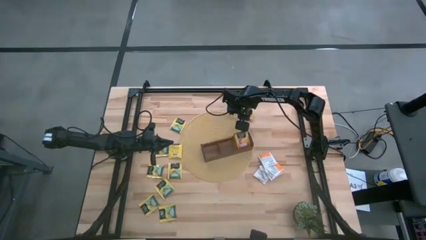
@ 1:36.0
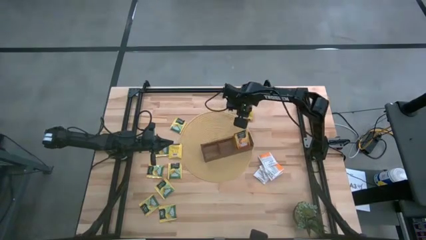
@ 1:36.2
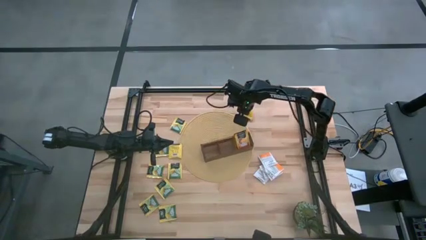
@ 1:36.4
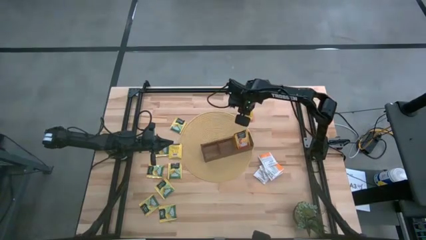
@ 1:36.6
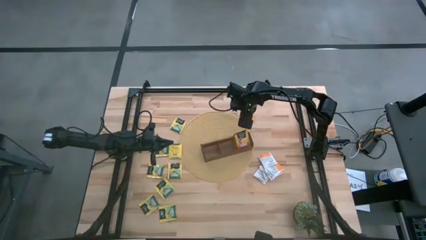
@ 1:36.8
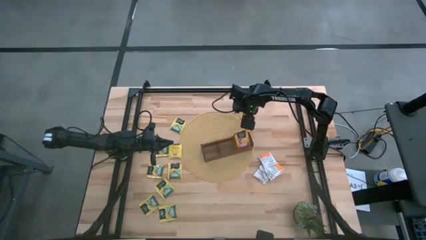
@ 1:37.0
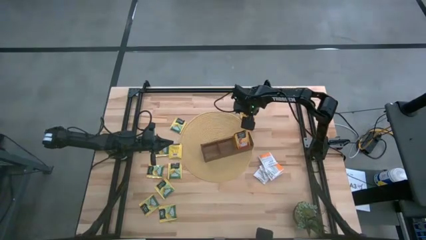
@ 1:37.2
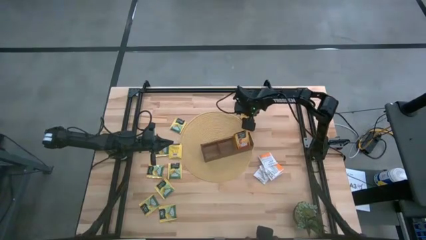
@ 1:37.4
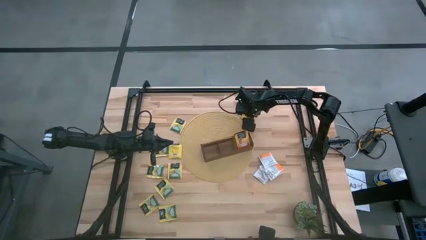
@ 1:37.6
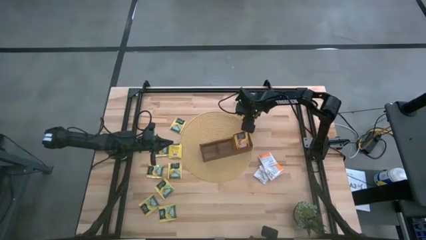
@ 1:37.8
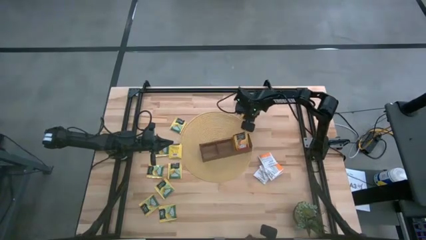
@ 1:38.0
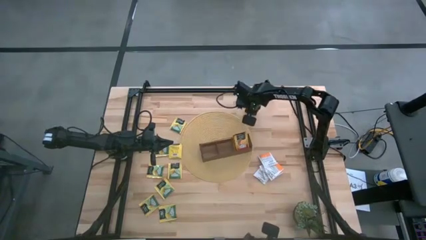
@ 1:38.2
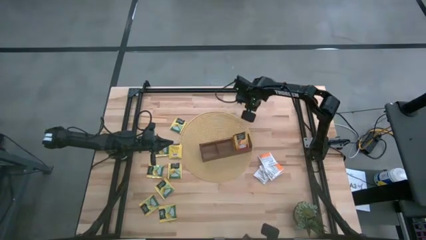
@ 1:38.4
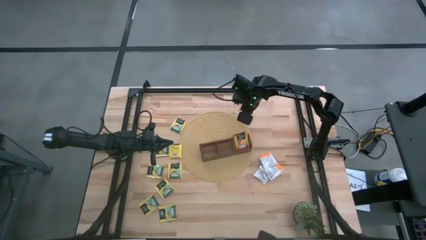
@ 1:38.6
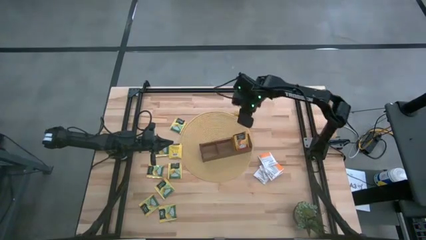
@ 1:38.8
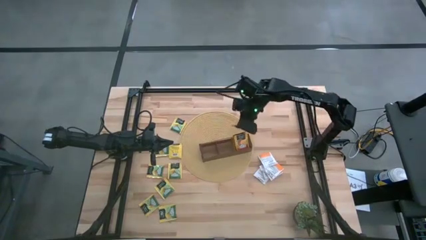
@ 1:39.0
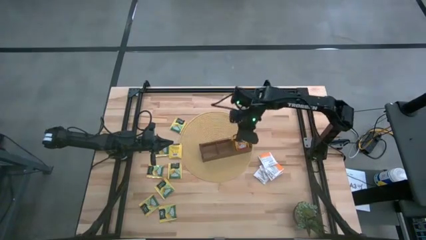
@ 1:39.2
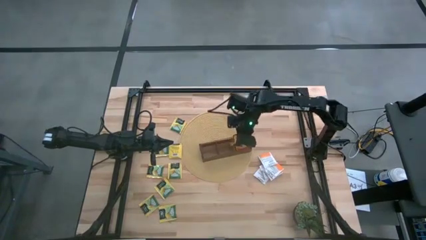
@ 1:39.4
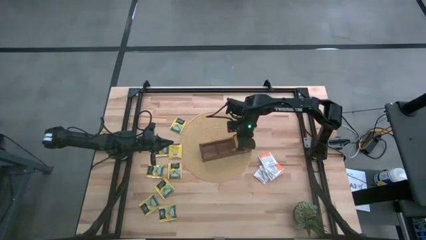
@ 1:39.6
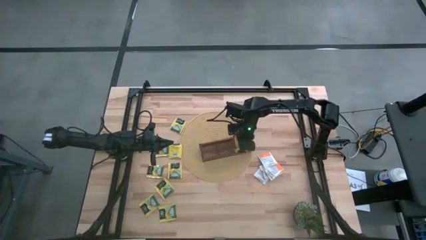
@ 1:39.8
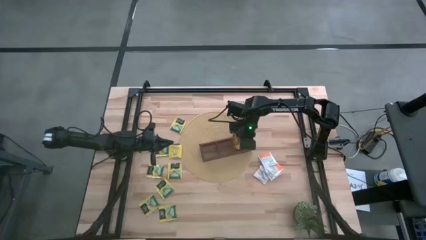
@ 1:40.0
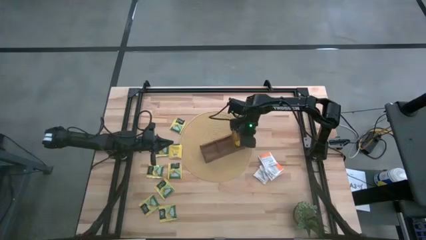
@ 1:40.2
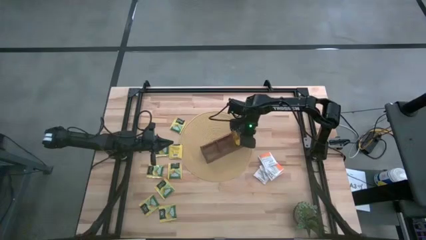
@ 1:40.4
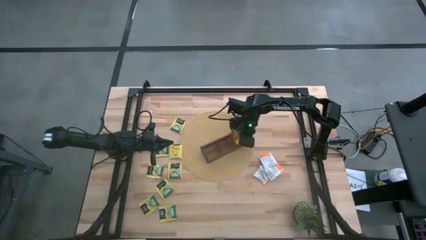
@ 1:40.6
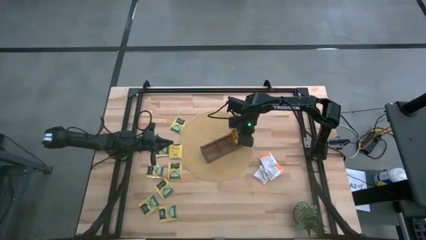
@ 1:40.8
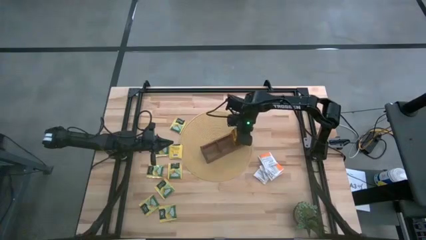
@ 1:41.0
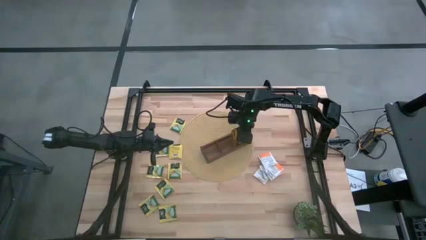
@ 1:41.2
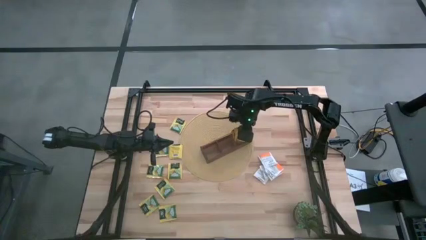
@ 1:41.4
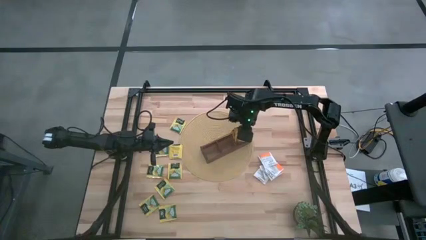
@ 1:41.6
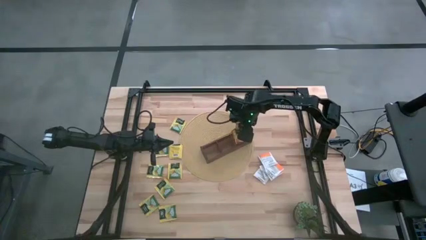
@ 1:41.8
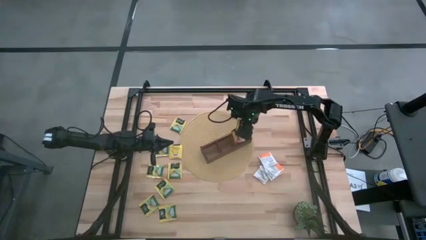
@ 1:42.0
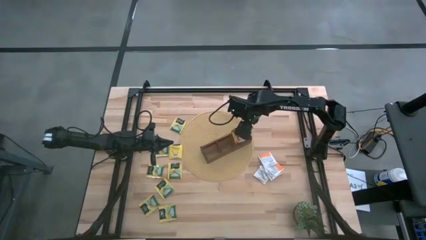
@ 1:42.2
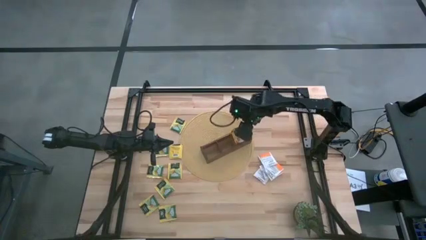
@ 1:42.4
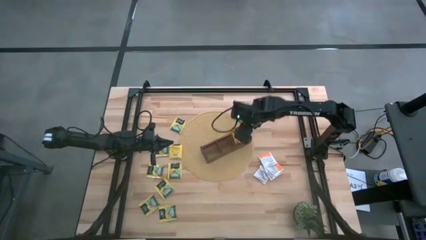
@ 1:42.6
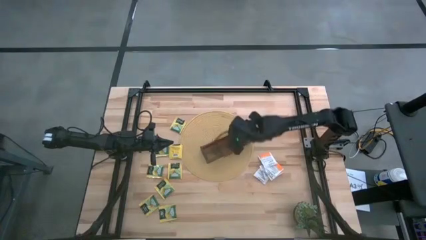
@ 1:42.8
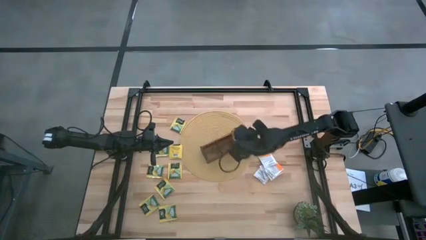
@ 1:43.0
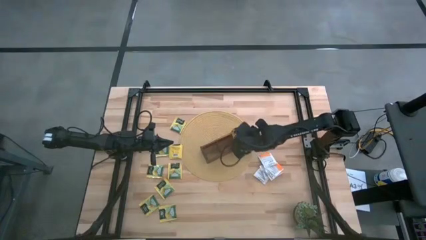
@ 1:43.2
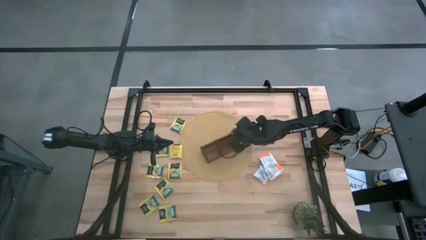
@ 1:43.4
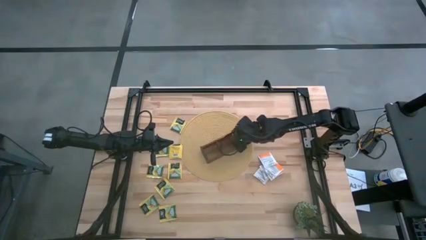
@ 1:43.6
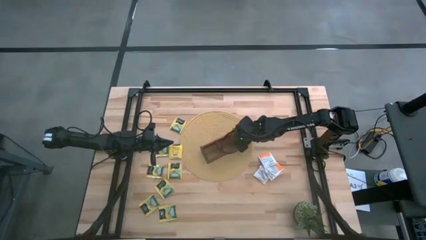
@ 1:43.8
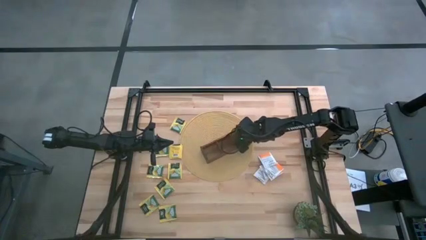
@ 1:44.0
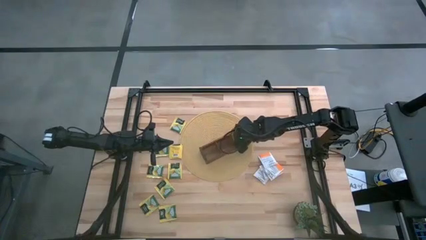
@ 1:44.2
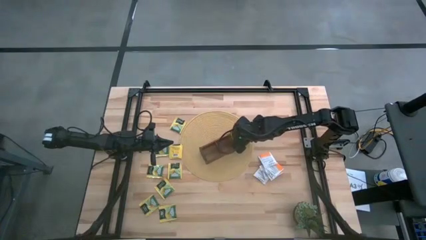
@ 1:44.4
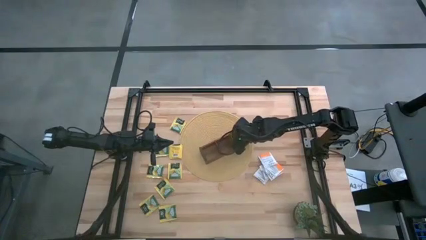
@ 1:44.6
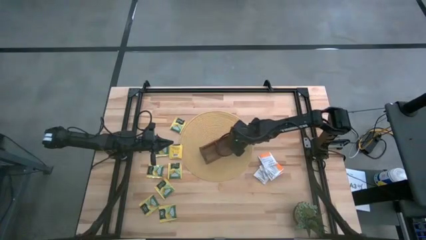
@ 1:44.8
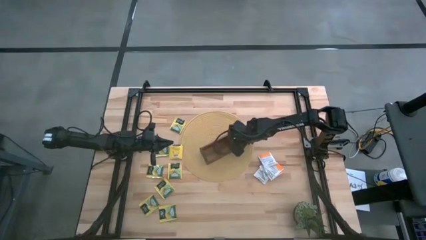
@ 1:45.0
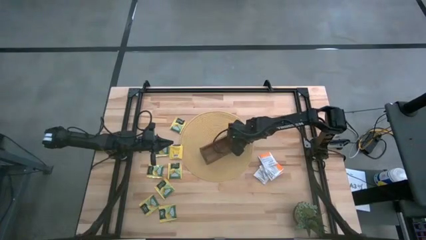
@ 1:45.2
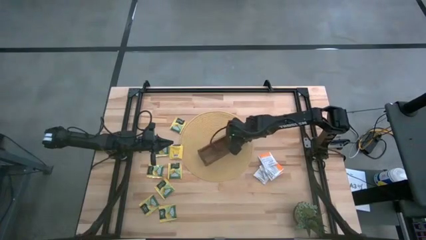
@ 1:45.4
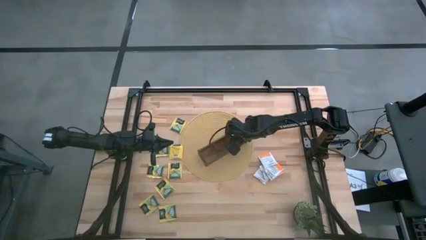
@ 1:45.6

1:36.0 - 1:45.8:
Task: Pick & Place Tea
Put the orange tea bag into the right section of the wooden organizer

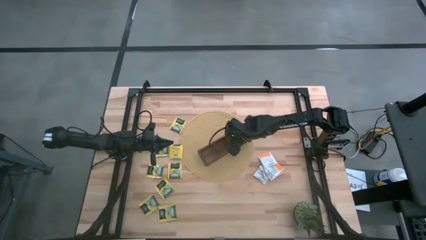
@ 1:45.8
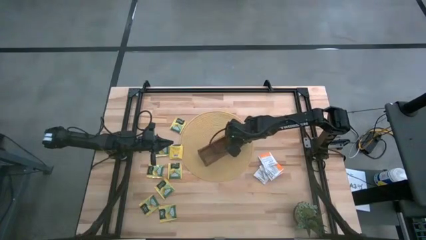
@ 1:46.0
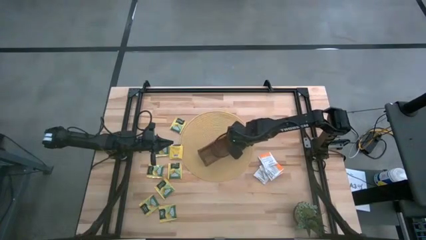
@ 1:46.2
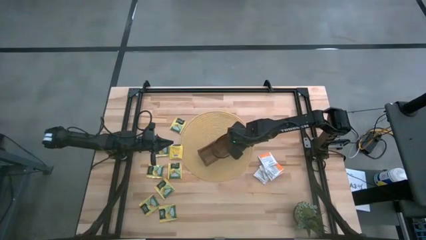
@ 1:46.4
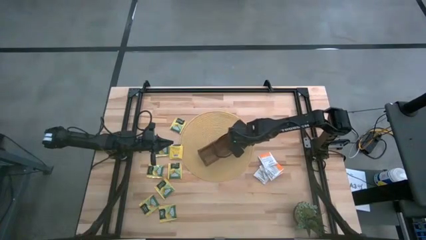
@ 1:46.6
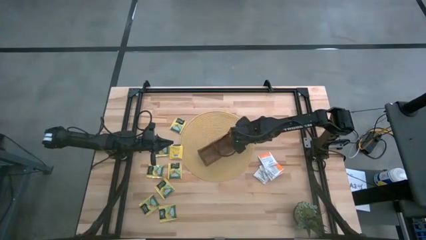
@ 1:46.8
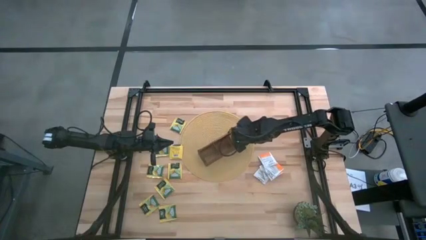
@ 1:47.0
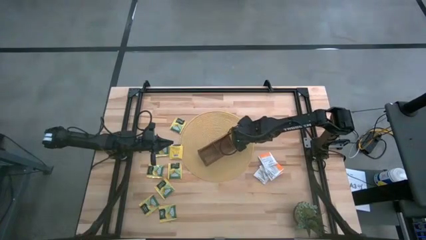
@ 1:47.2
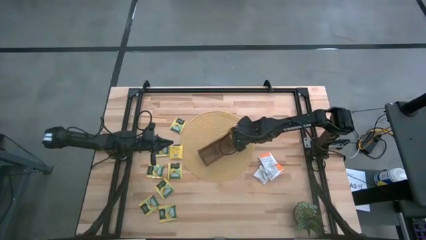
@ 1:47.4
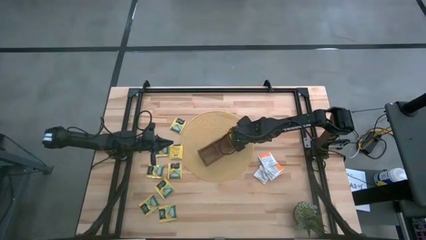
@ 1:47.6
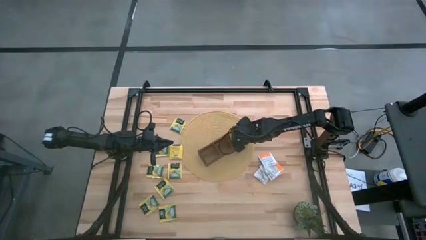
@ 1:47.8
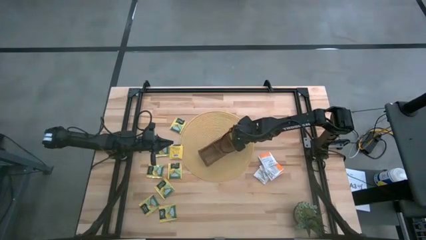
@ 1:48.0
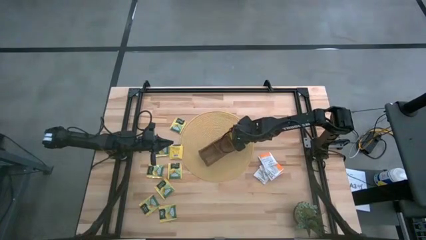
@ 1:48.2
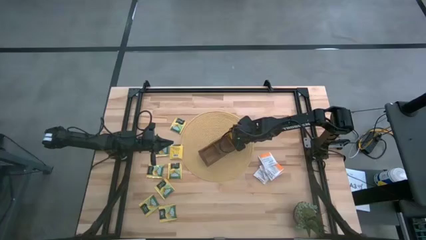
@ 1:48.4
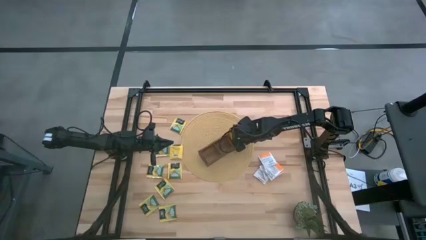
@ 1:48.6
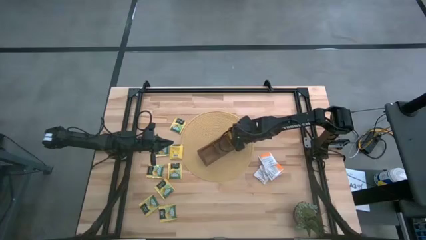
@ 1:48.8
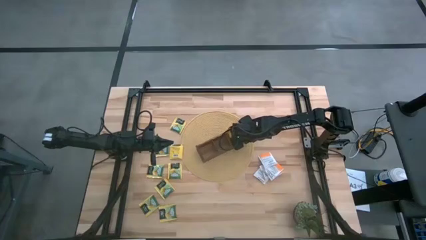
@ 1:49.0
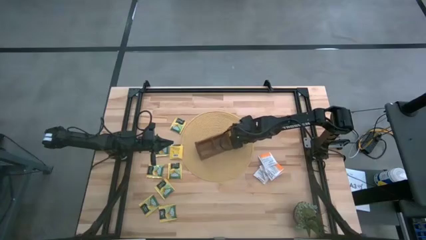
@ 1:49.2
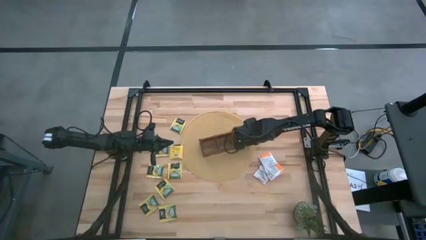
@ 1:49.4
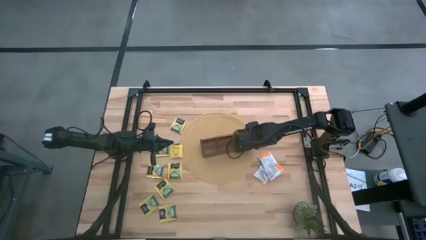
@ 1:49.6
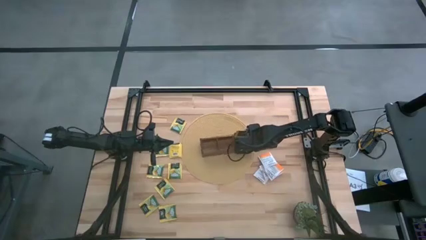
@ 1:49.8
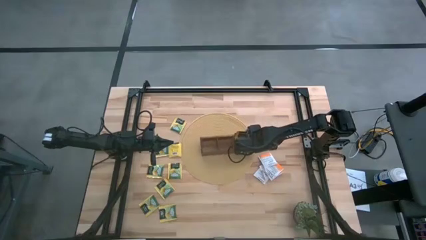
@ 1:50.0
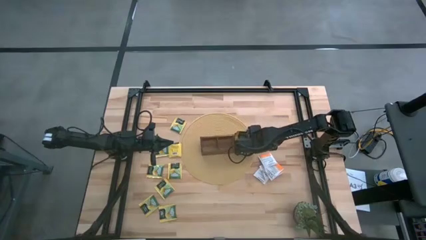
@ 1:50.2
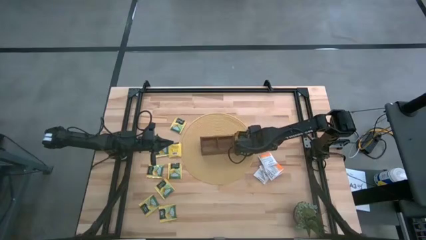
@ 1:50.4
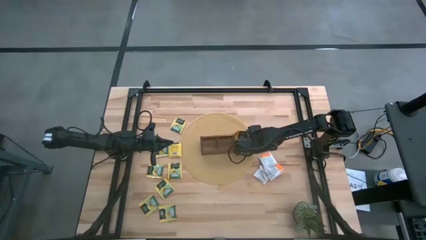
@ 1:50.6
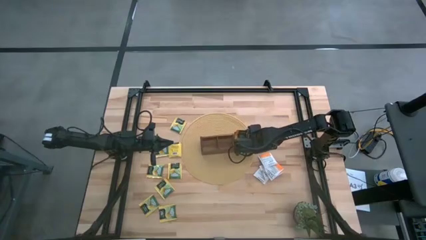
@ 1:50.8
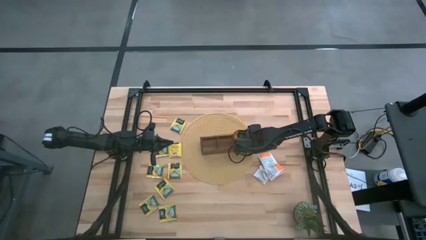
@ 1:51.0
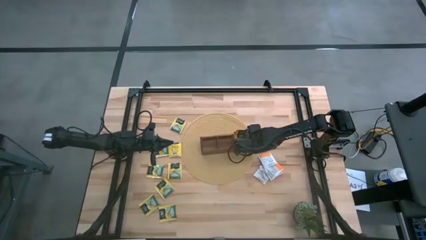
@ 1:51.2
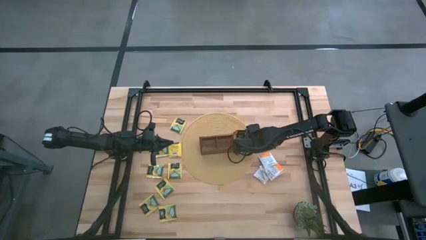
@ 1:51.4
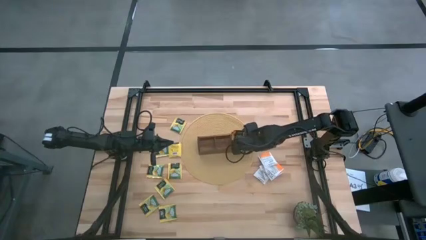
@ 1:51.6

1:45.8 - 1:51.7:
Adjust the wooden organizer on the tablemat
